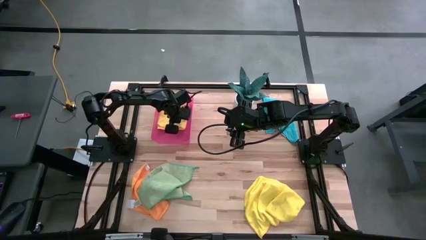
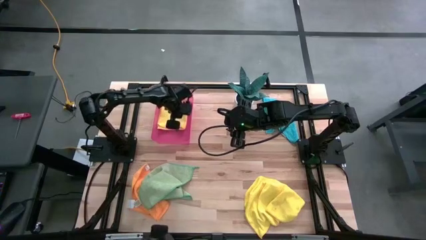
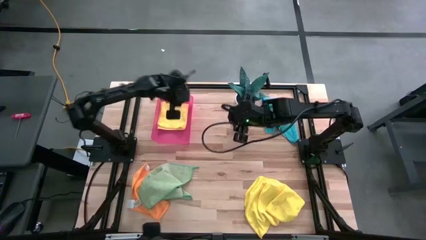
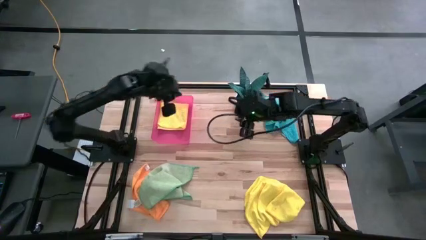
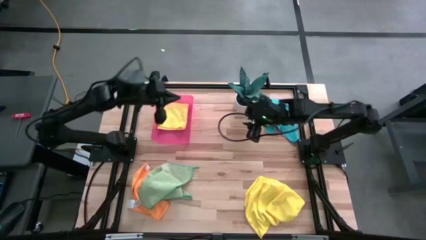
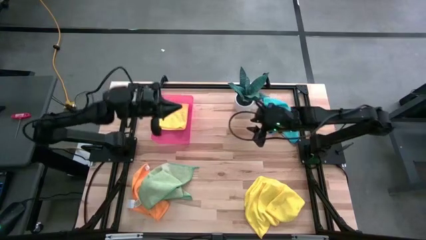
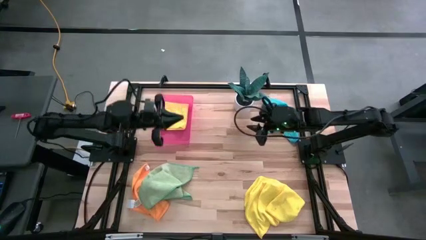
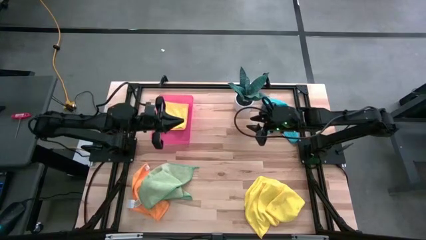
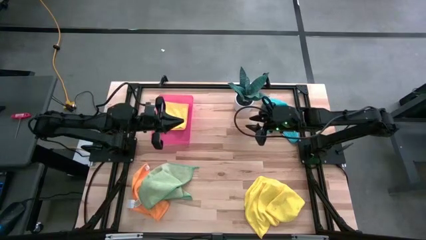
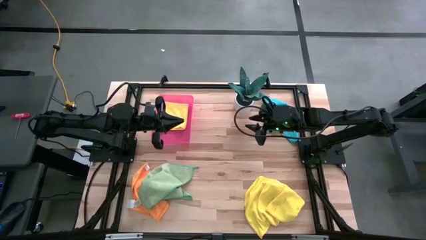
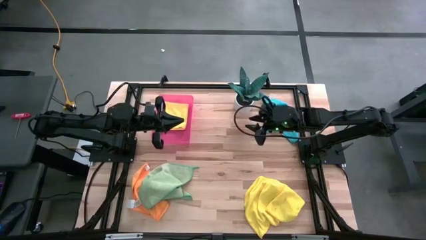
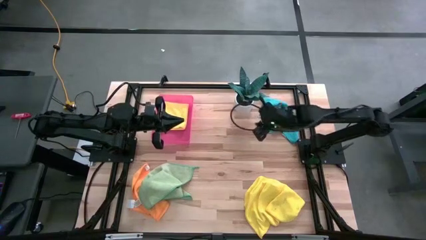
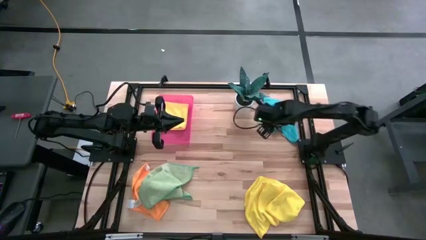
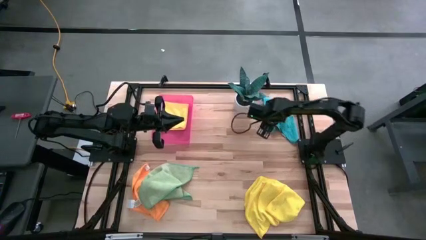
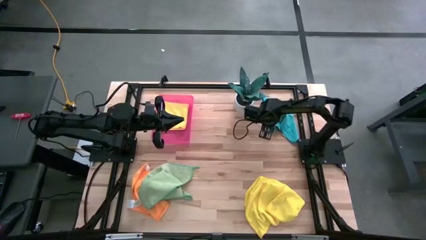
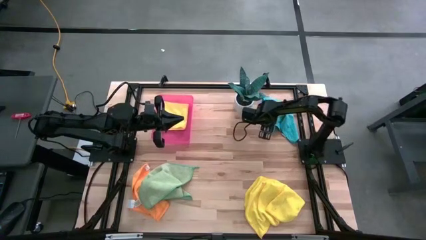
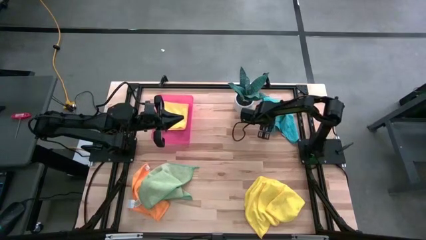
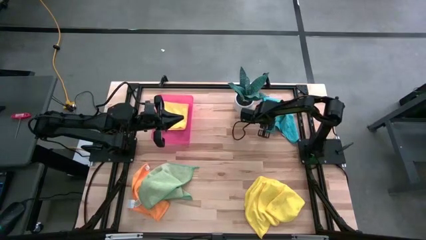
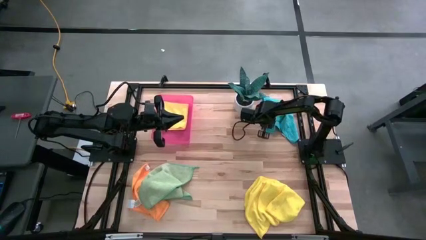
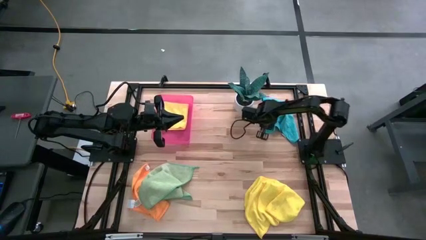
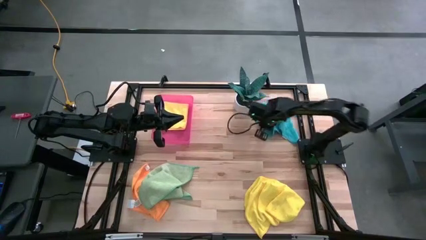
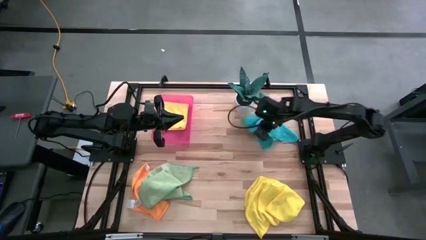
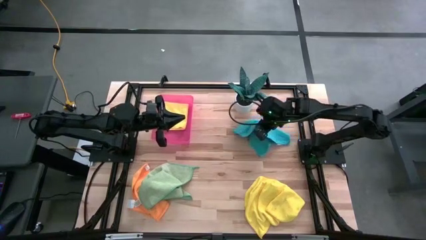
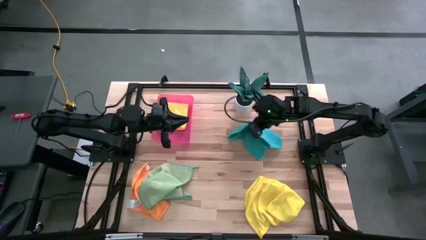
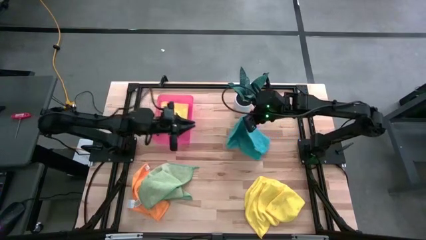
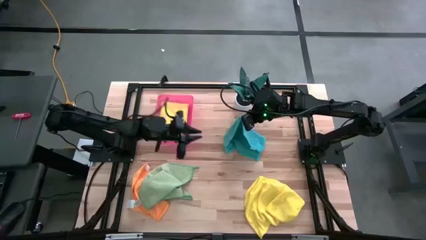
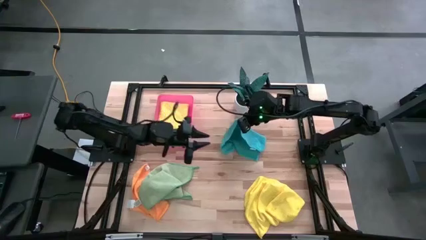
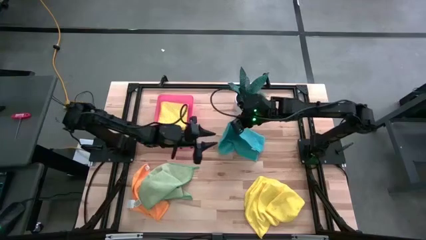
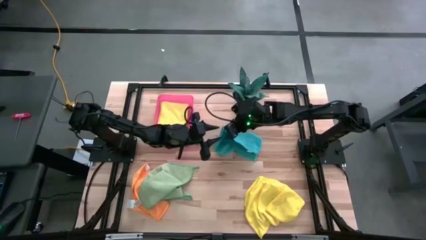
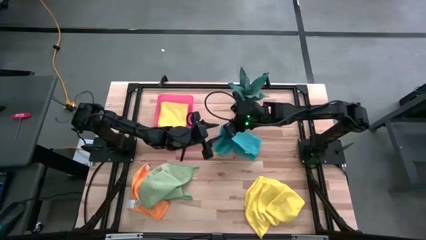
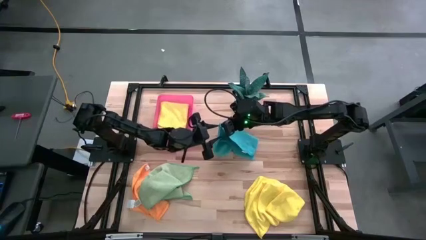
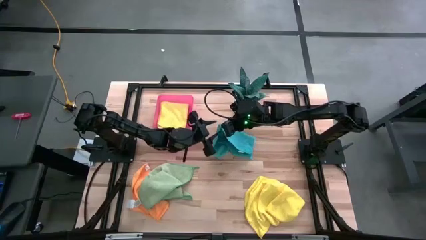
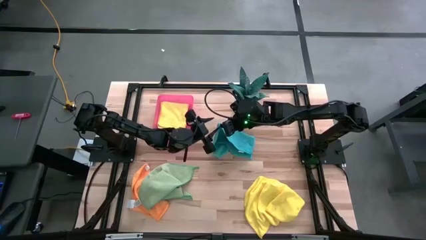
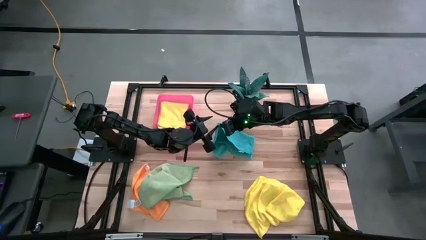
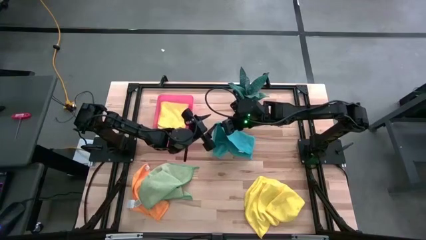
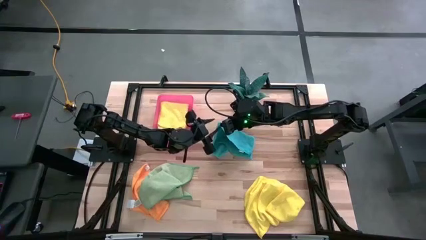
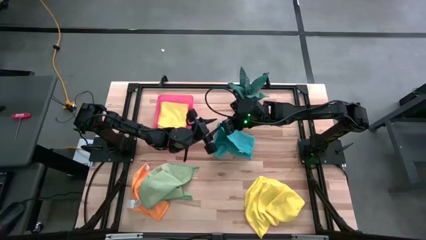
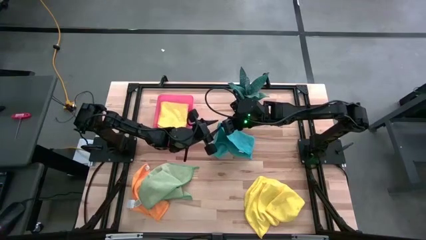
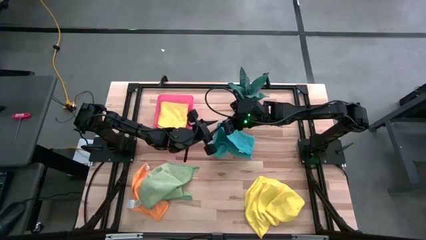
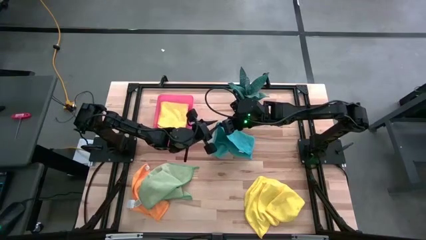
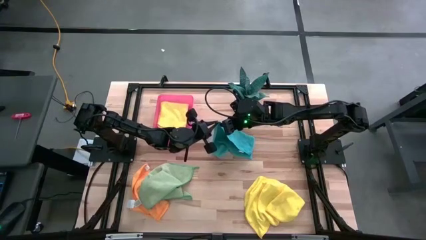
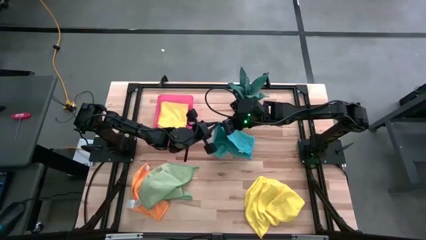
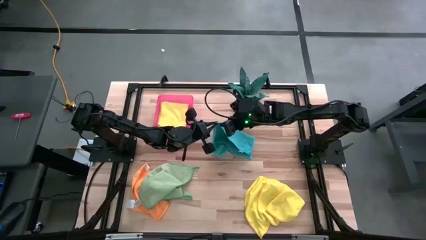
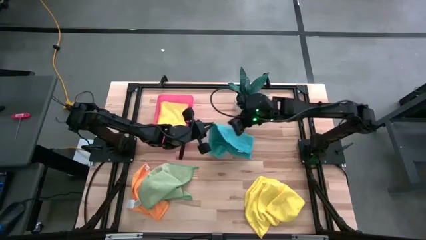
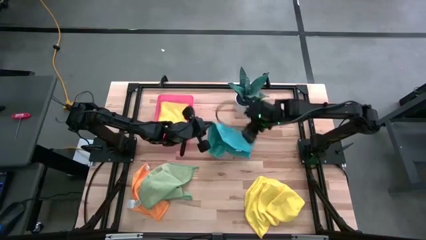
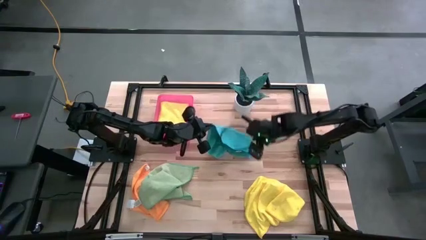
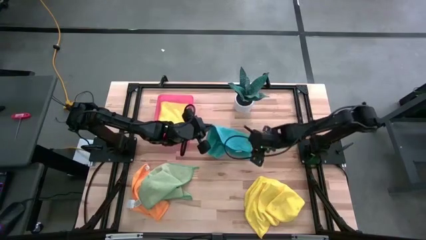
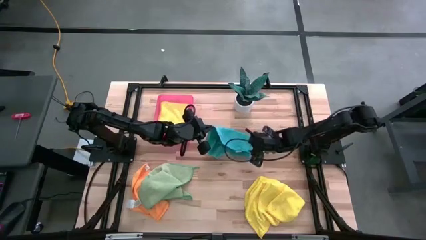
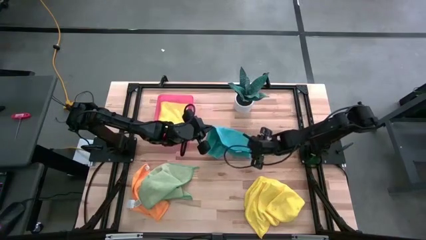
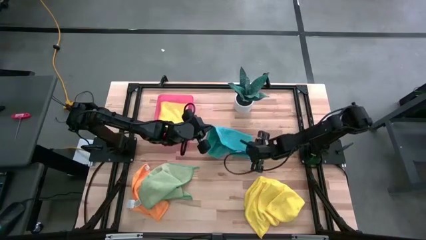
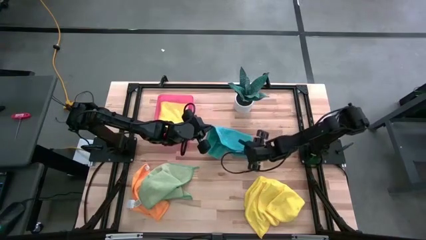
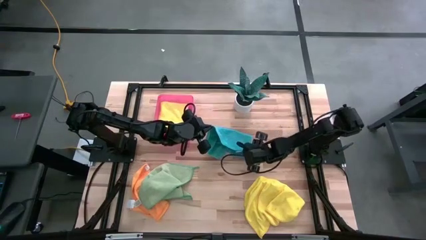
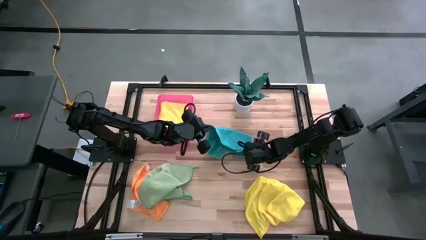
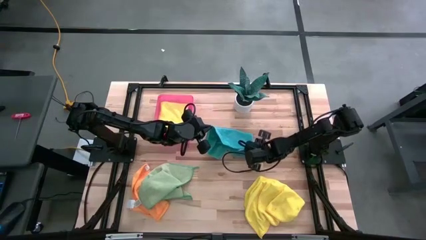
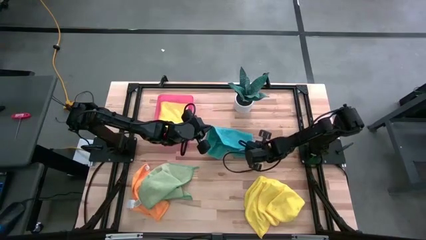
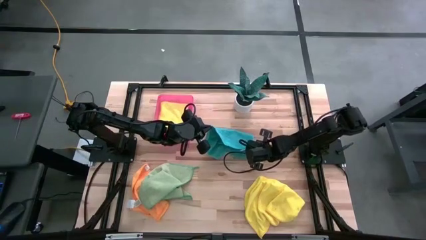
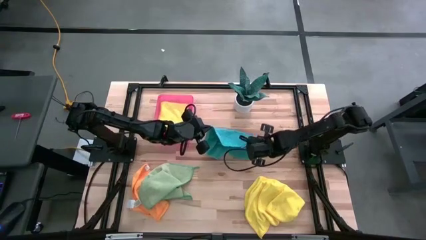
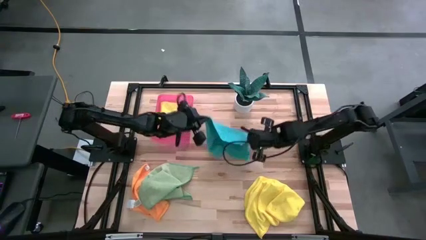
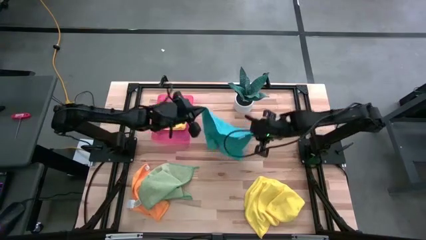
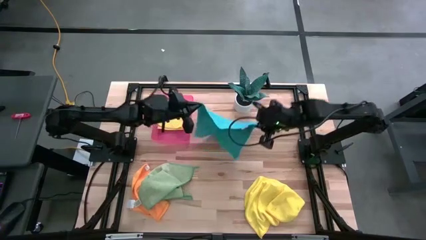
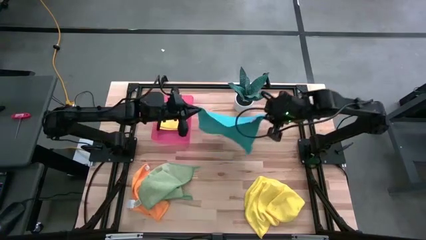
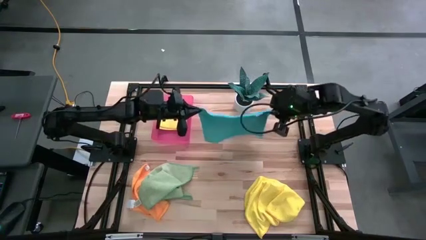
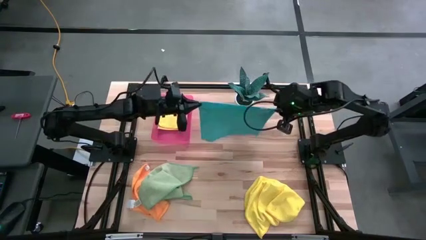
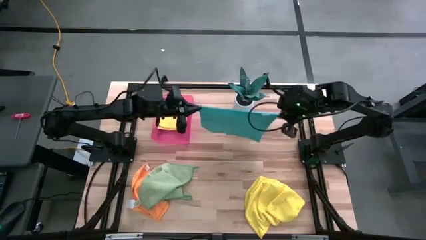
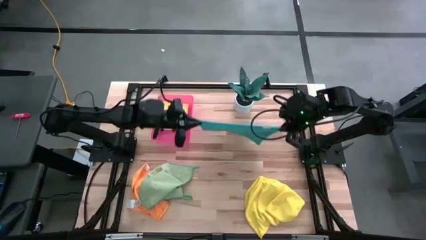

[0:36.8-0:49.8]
Task: Fold microfiber towels
Fold the blue microfiber towel

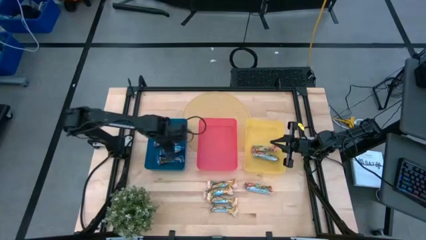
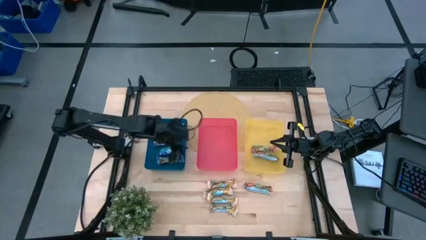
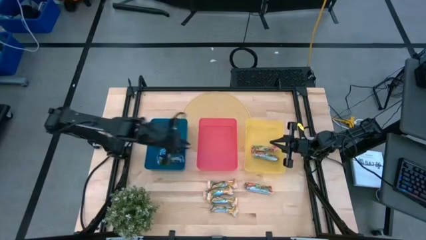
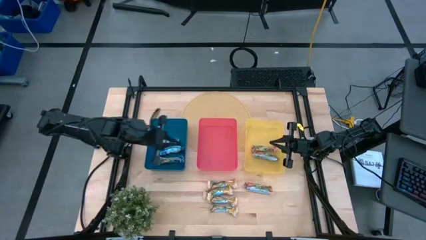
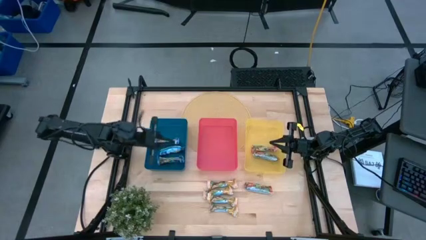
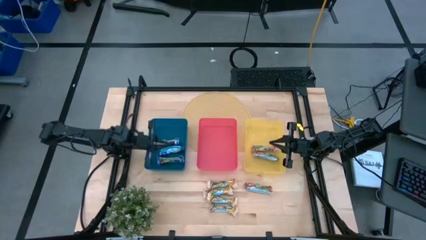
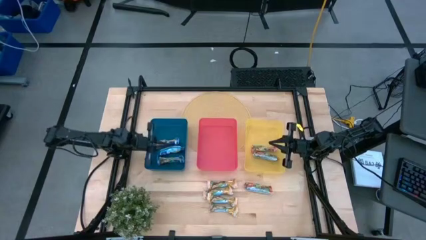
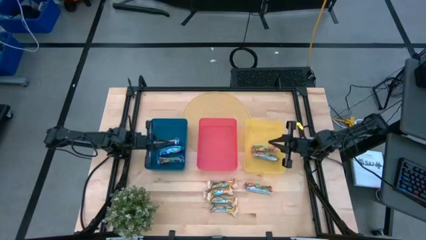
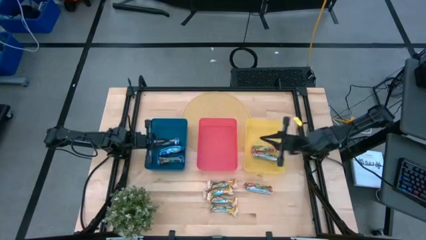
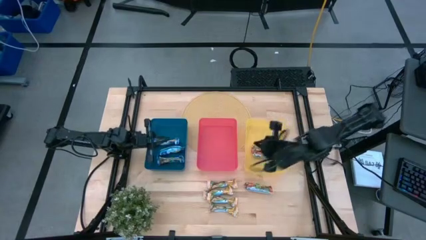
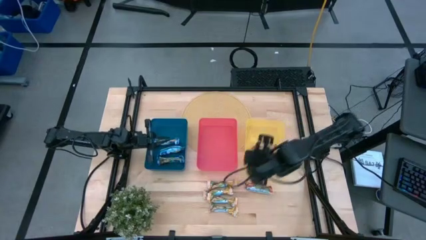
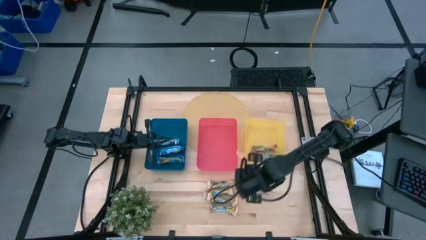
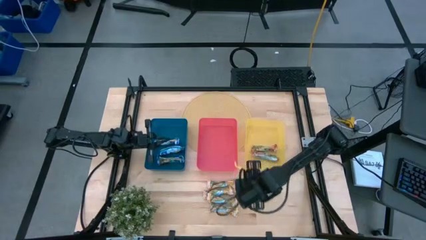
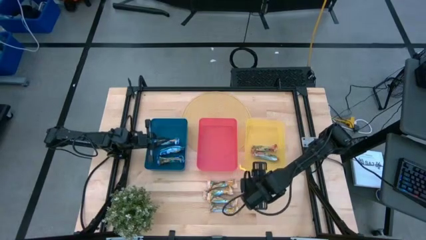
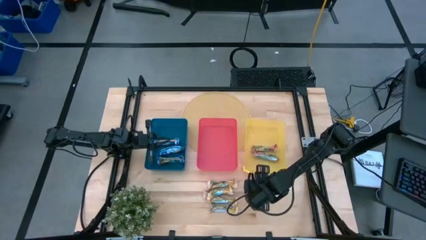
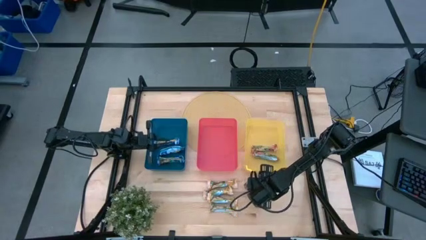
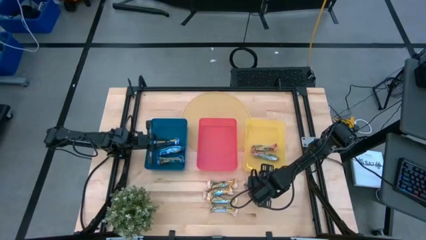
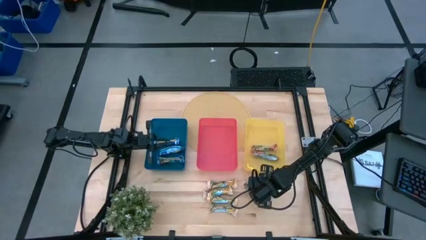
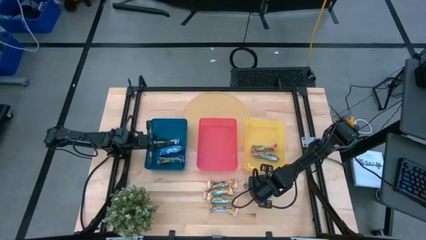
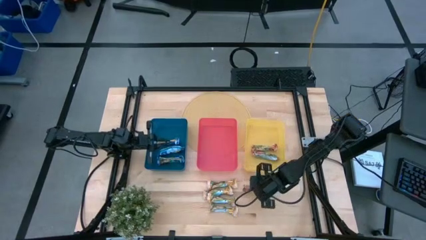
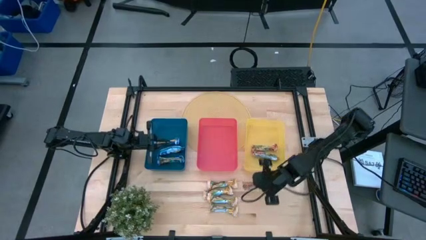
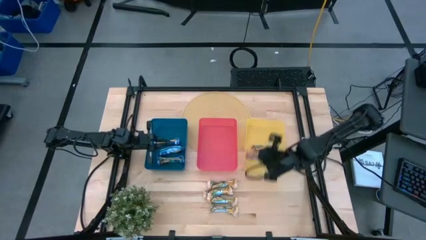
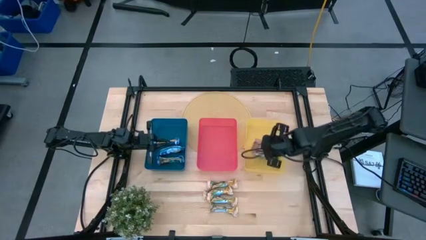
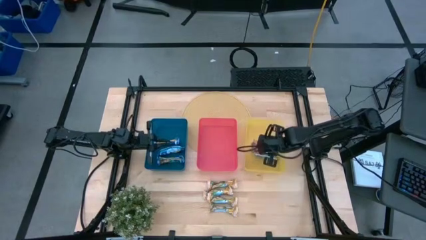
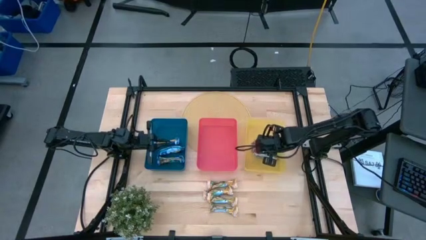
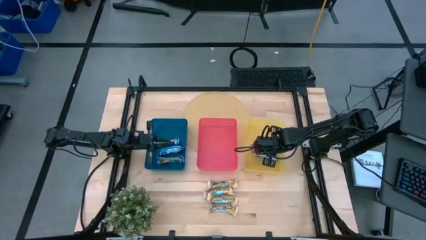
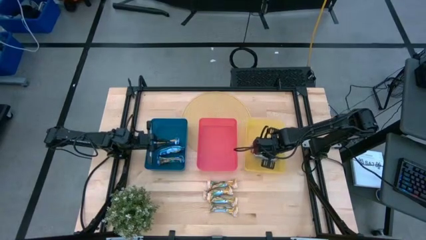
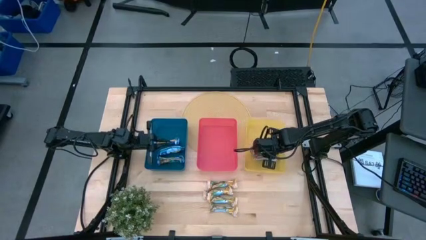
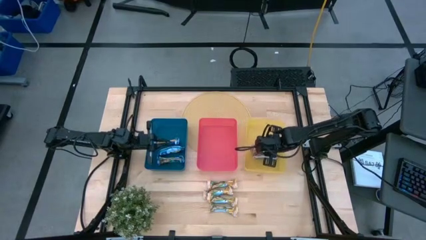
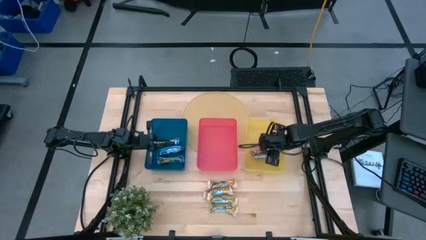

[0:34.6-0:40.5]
Task: Pick and place Granola Bars by type
Put the green granola bar into yellow bin
